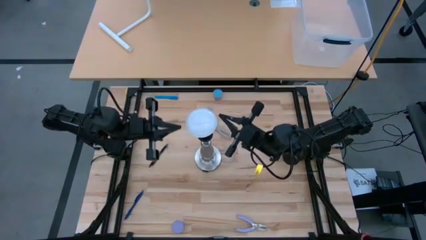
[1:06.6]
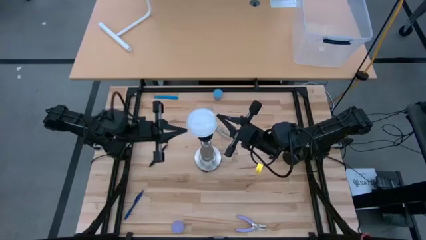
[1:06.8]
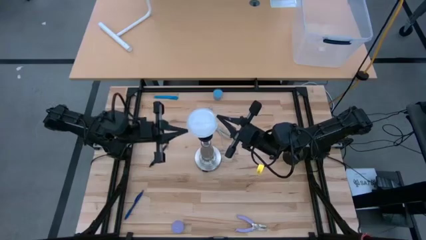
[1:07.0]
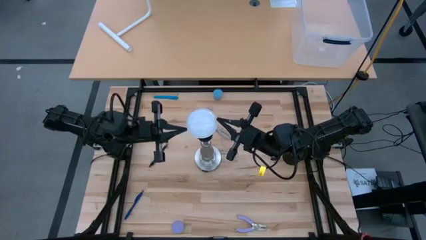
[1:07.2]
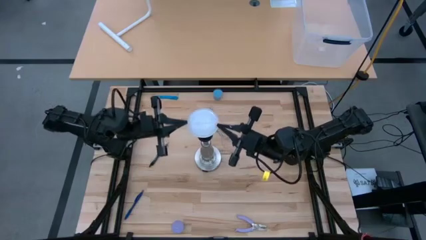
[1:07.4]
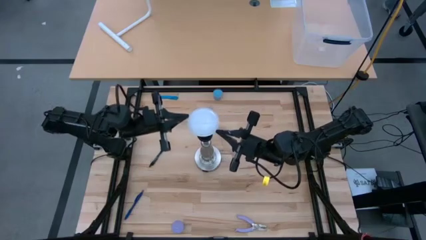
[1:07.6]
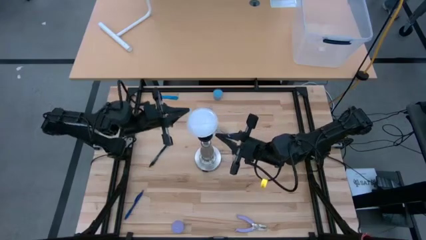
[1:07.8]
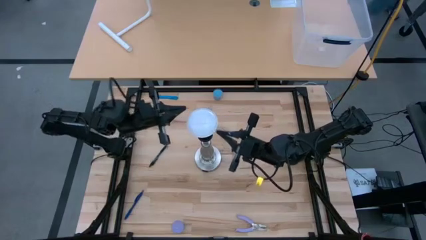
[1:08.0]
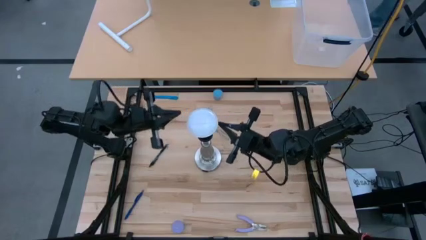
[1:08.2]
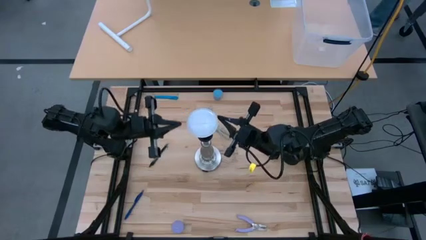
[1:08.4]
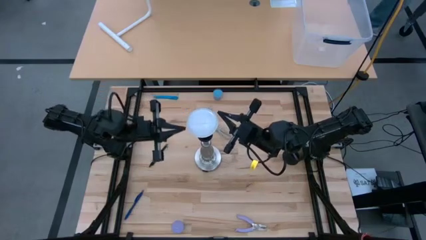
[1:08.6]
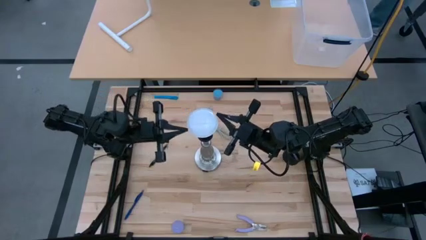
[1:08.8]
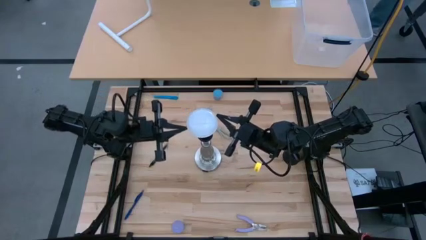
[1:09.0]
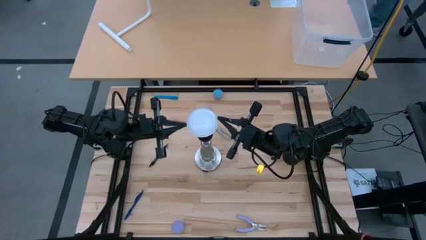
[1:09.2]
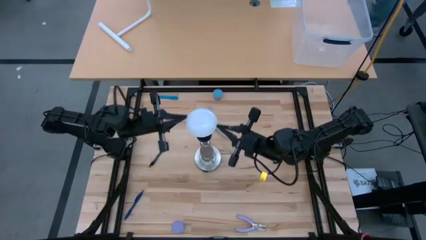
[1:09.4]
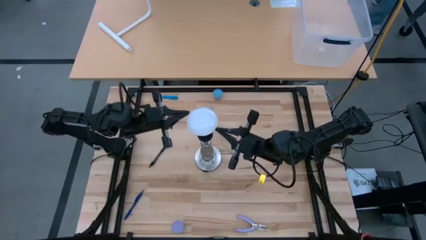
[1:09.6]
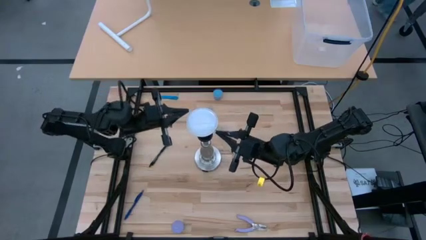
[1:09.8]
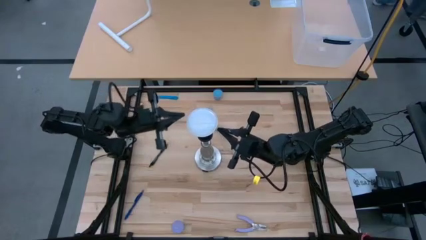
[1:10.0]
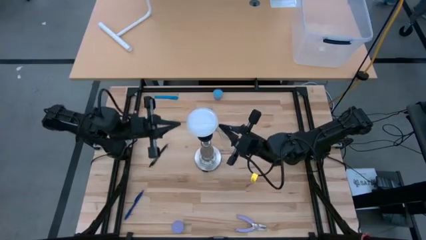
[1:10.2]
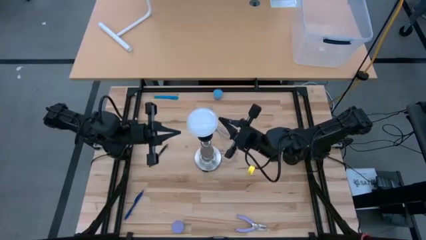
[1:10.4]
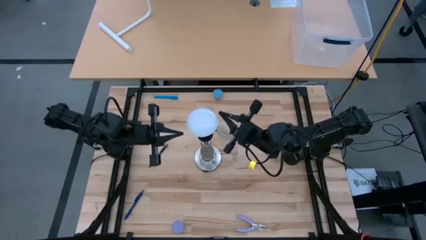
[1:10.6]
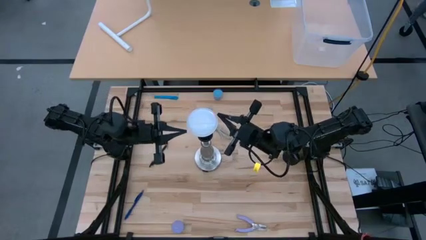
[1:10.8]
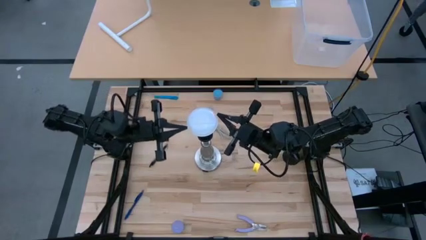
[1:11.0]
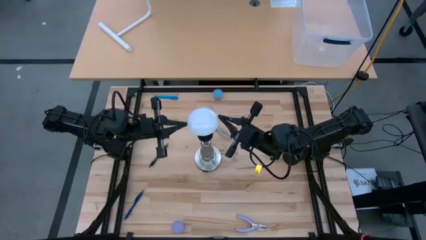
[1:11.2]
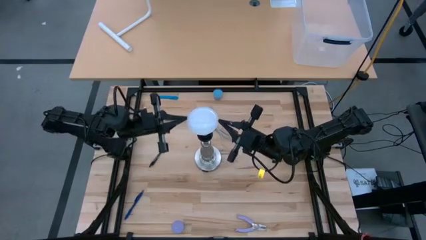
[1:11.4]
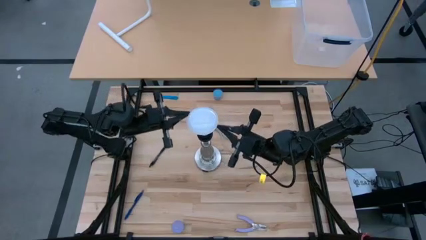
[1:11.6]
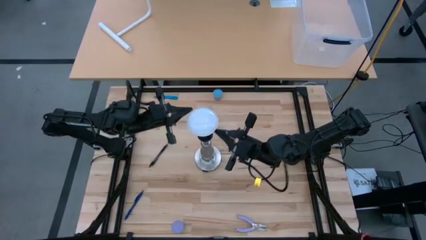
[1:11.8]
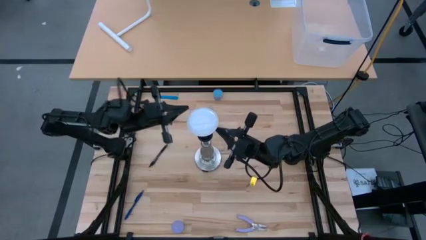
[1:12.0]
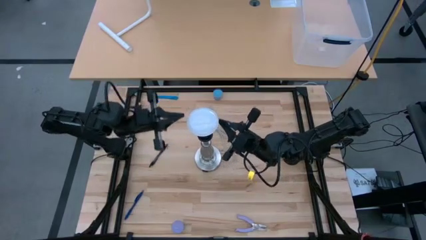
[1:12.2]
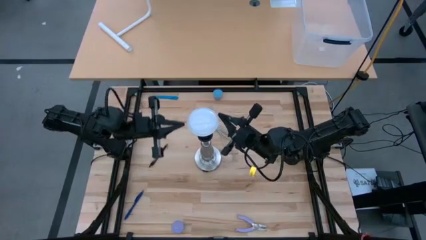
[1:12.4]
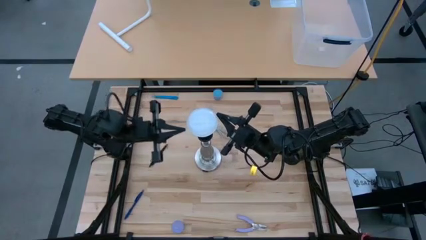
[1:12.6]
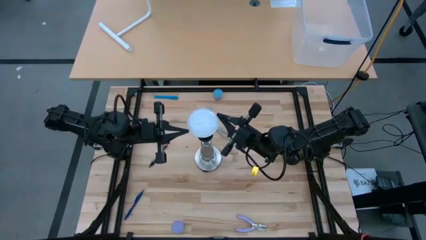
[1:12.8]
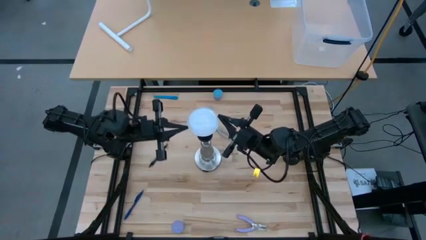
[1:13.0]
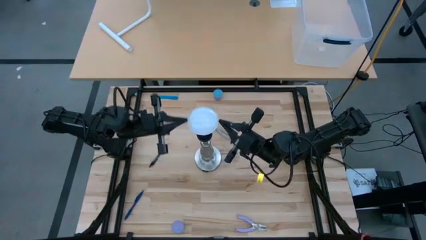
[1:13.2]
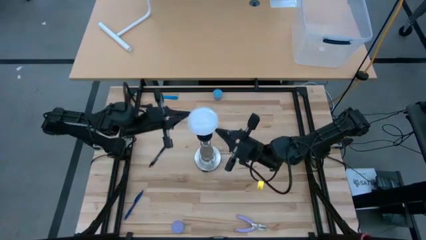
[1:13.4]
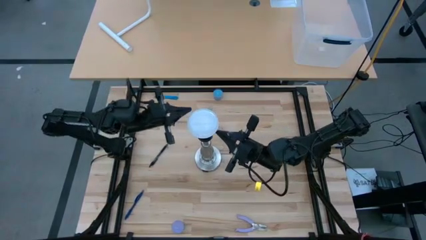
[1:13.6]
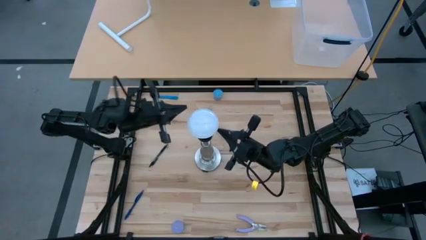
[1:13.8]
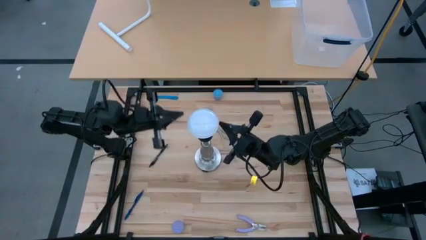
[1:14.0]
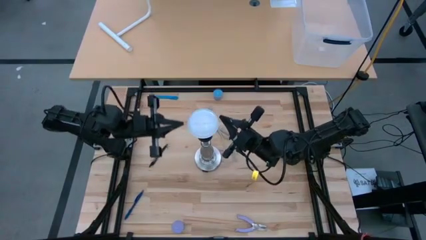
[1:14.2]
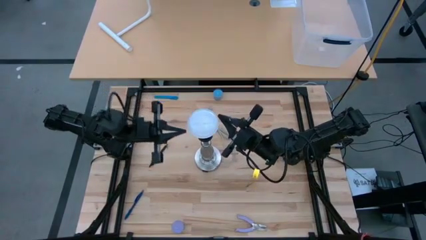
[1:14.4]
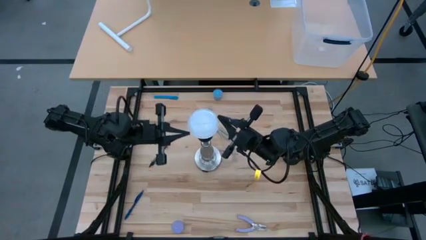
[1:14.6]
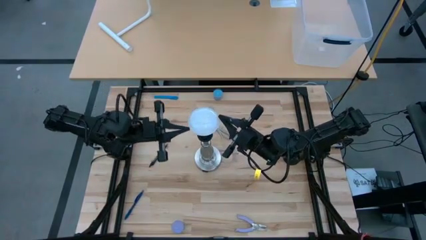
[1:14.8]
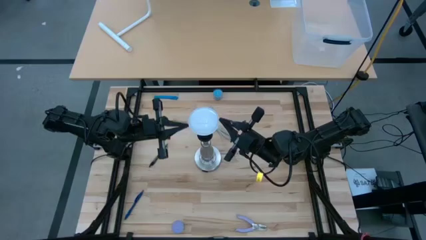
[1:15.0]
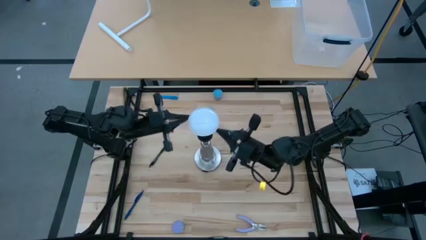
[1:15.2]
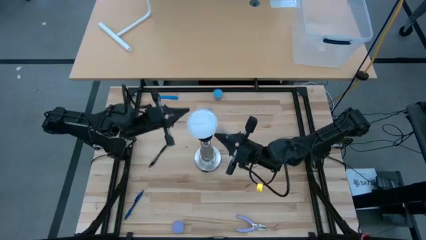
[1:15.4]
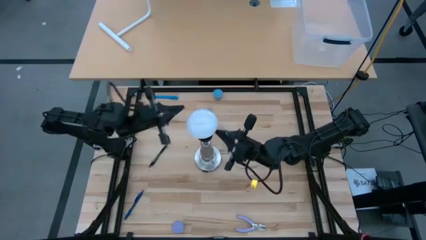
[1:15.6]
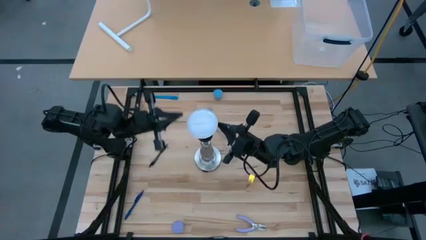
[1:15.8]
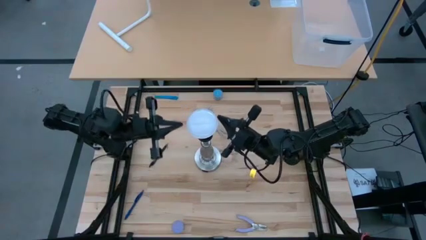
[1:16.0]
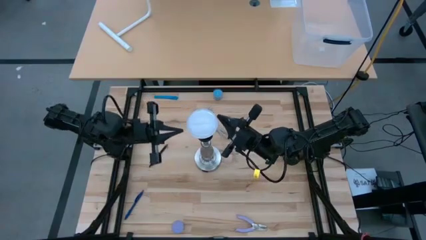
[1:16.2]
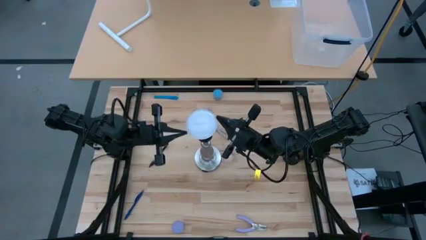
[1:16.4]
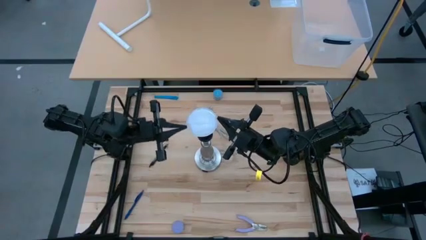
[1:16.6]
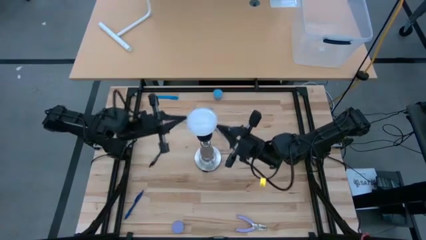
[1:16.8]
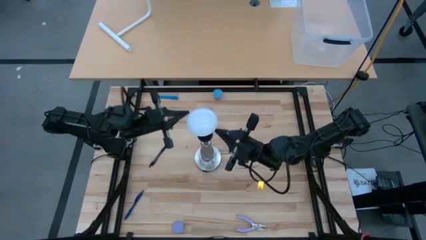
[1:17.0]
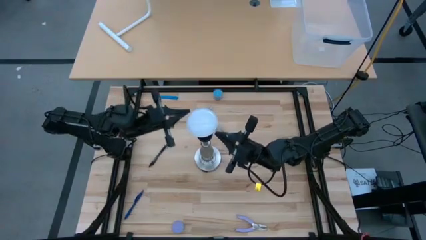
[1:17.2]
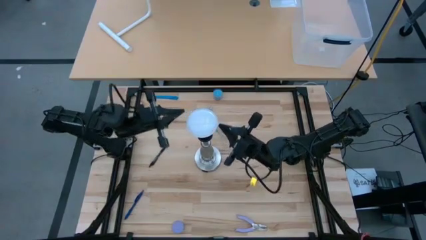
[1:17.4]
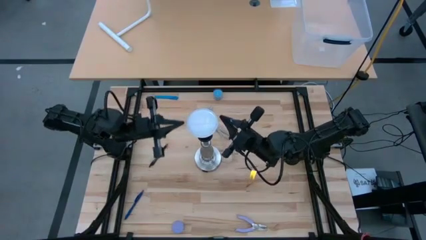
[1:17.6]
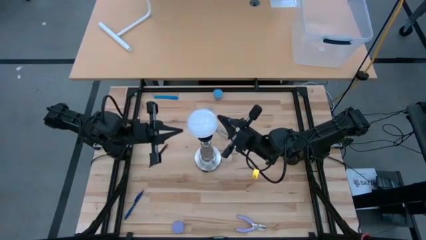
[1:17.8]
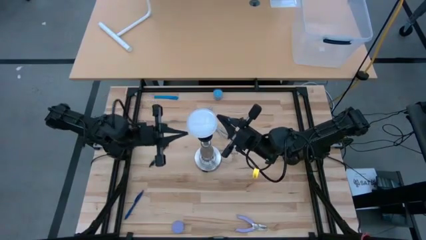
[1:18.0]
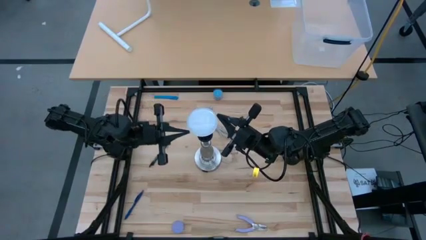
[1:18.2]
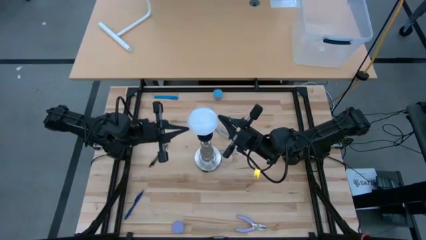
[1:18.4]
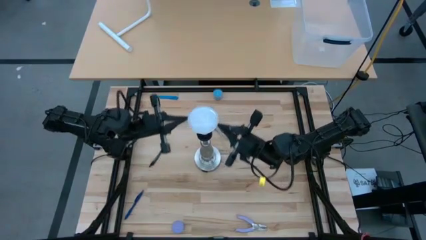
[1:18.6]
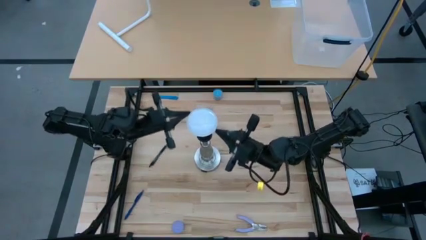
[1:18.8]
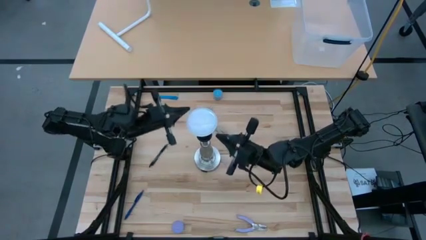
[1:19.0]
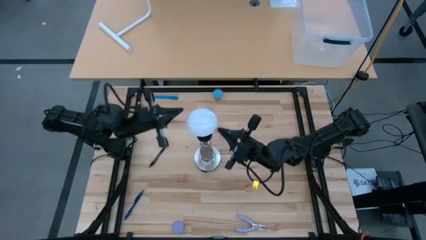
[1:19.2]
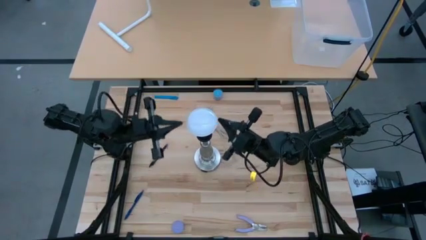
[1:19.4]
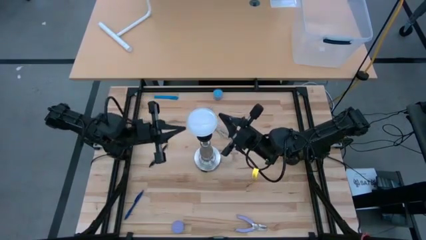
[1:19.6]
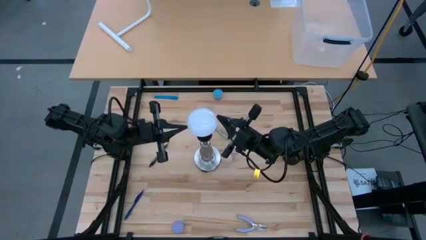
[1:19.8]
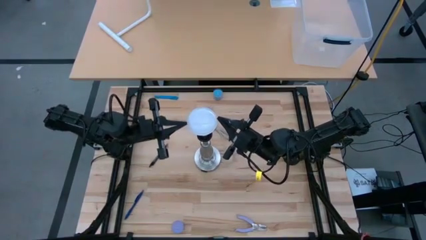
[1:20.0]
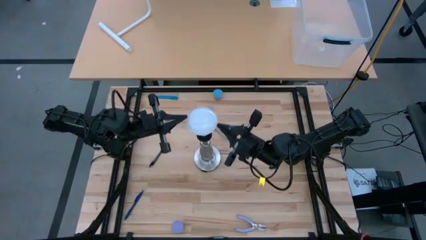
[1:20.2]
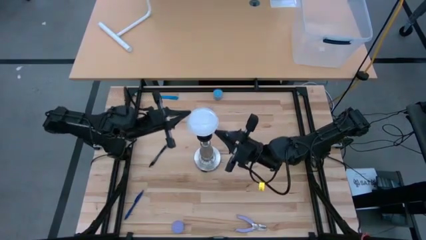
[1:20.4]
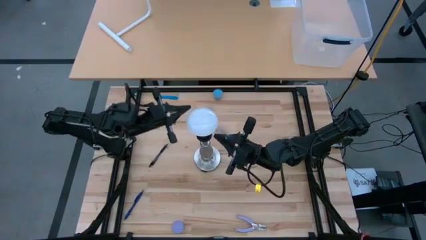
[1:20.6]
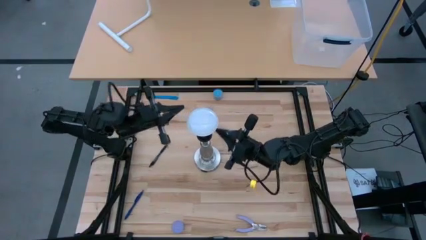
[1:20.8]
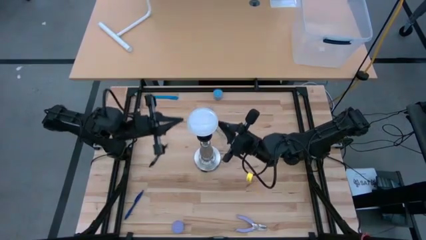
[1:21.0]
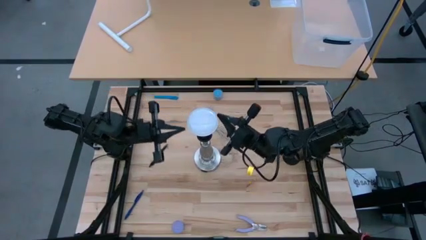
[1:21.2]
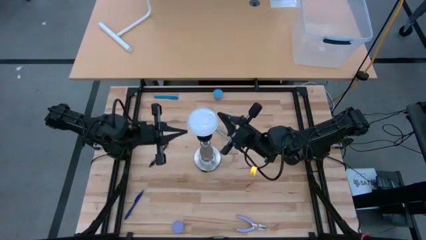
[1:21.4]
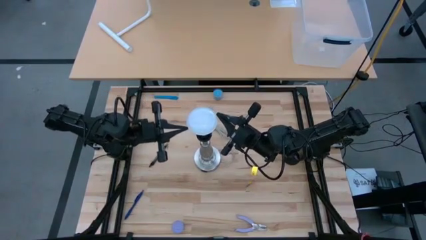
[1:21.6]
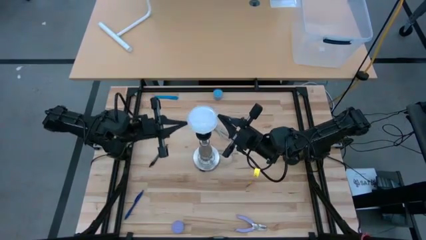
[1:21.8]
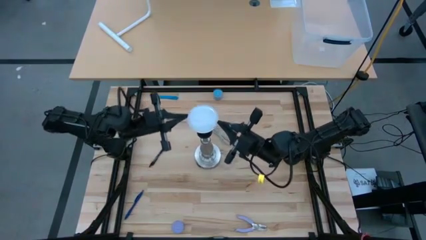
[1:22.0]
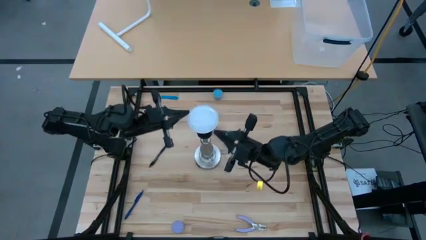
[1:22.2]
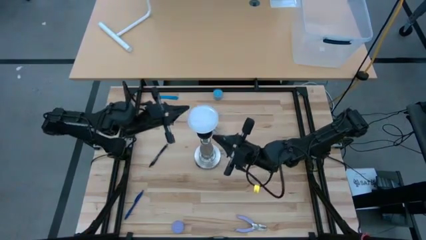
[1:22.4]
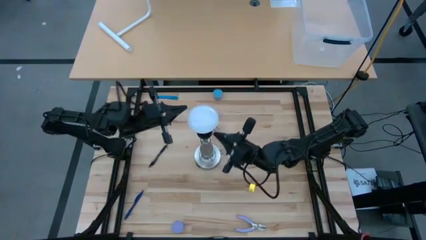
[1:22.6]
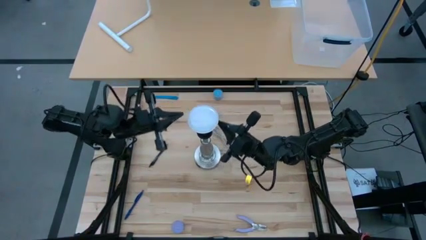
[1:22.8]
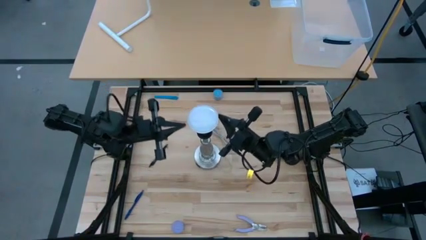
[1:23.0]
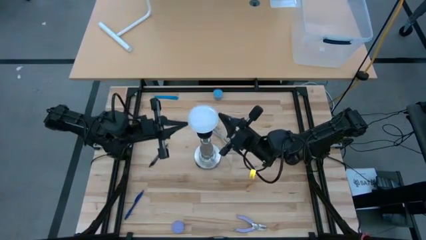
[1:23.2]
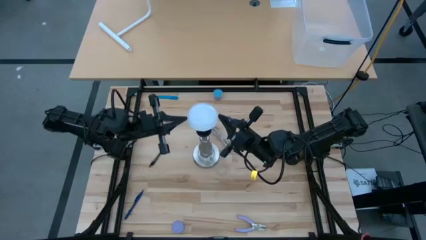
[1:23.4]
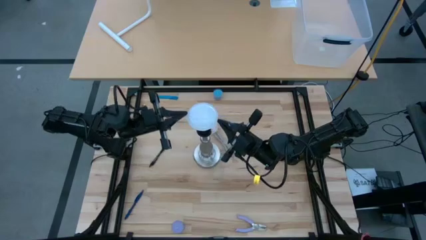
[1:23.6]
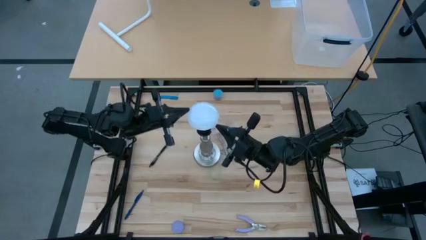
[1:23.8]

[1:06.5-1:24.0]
Task: Screw lightbulb
Insert the lightbulb into the lamp
